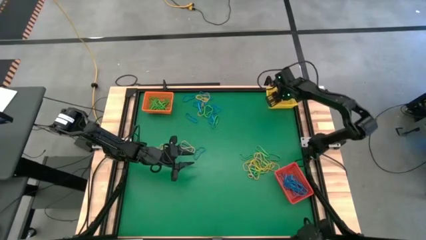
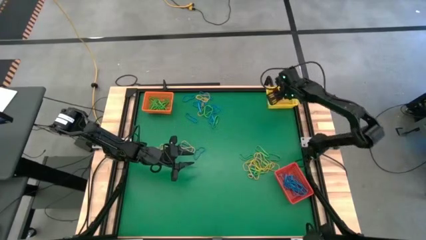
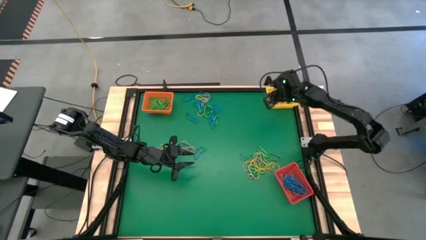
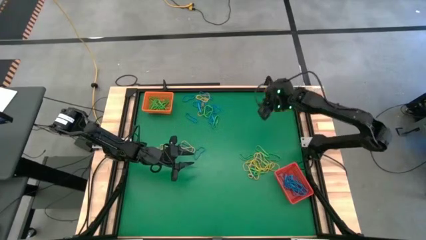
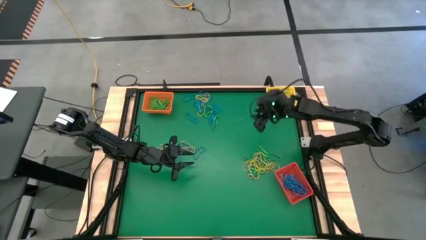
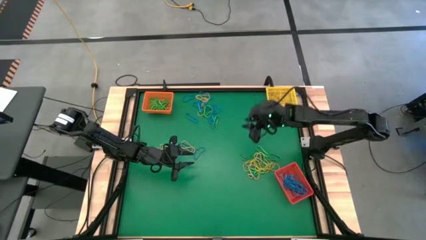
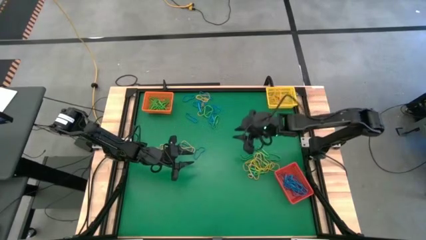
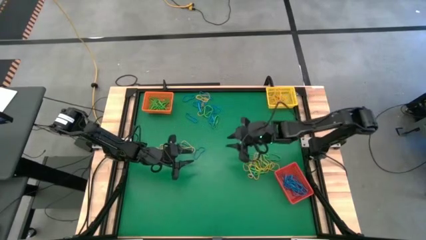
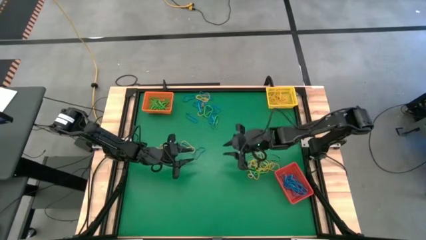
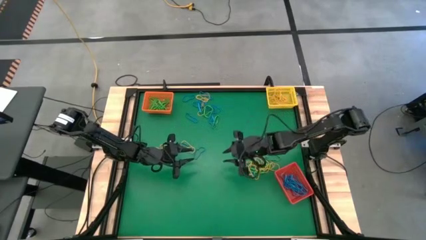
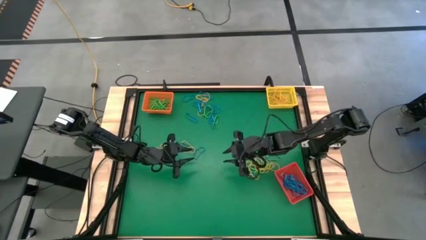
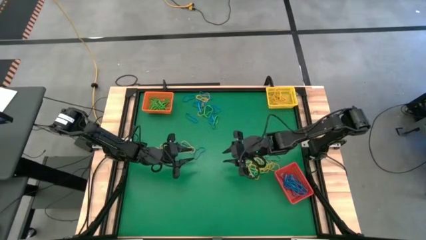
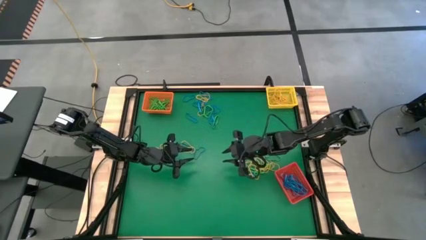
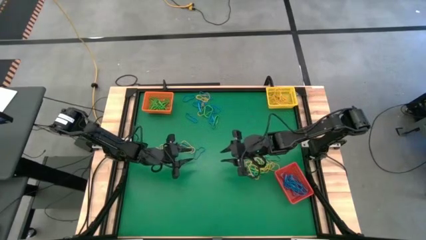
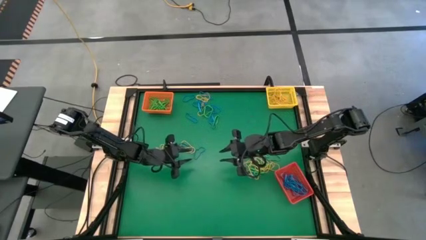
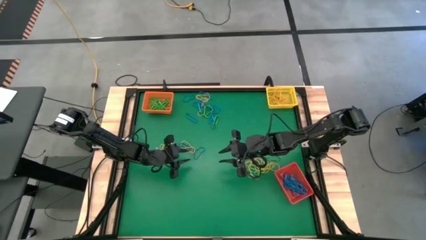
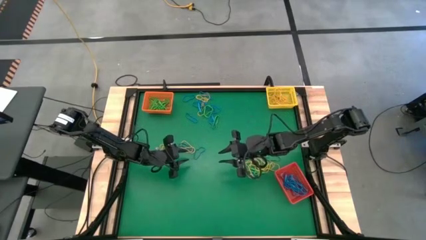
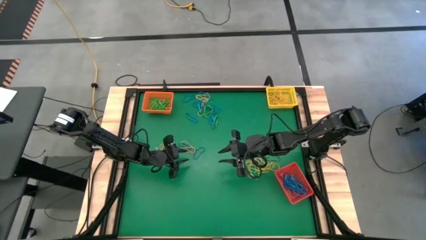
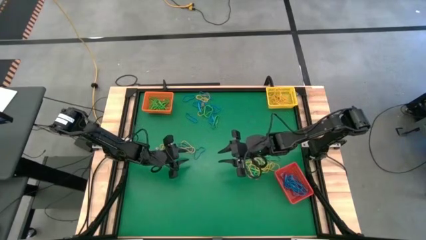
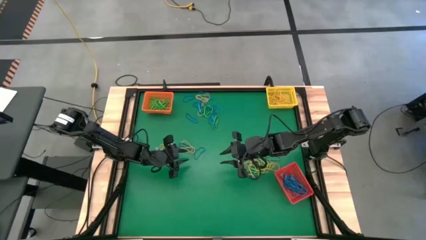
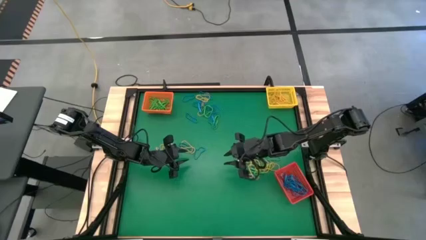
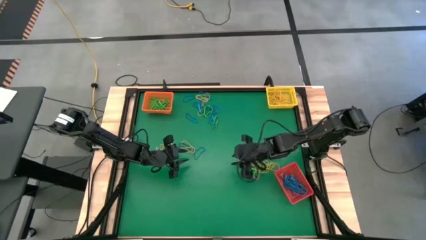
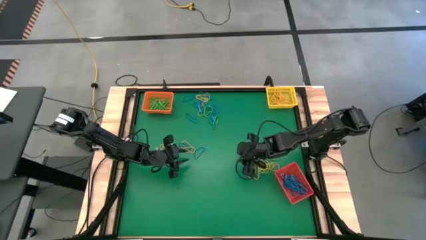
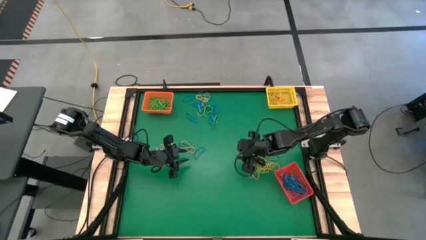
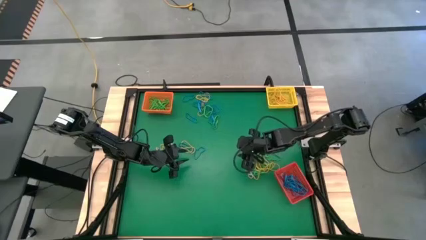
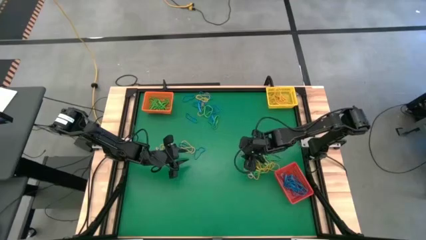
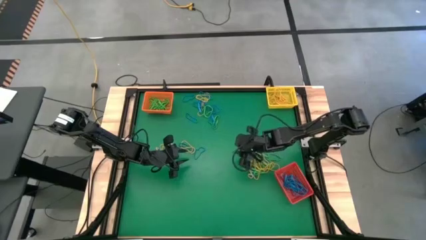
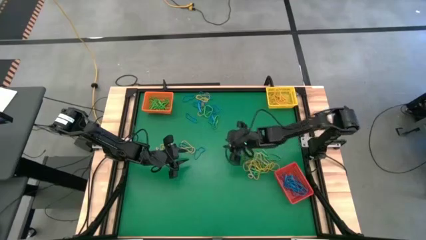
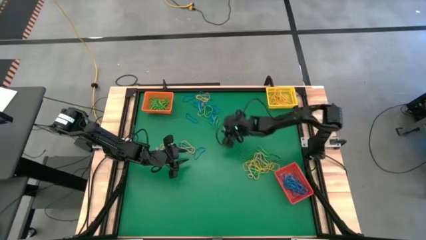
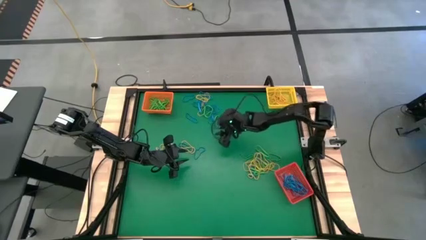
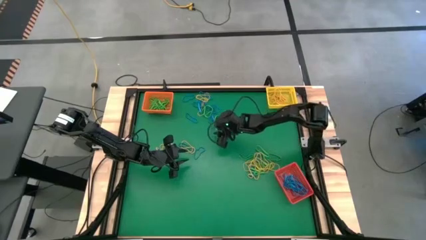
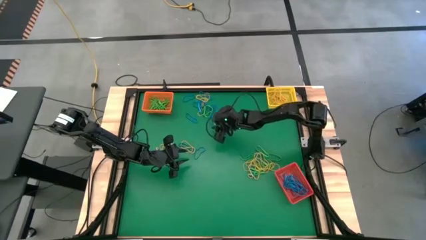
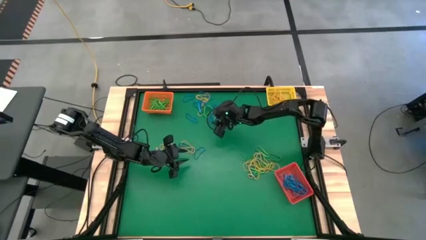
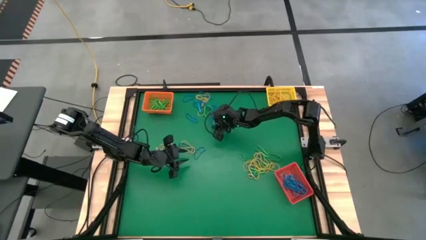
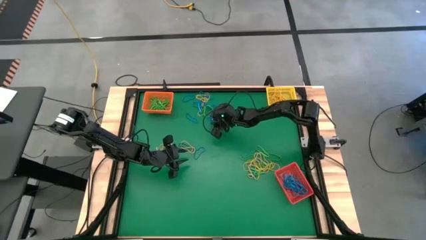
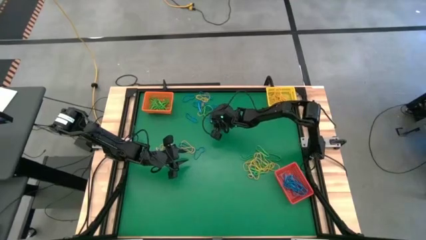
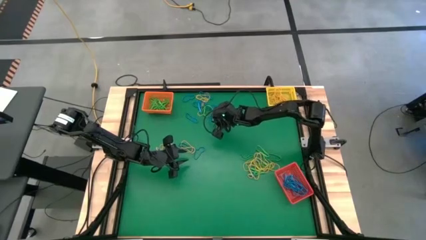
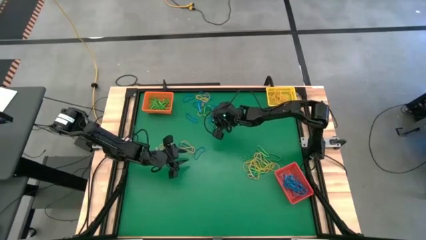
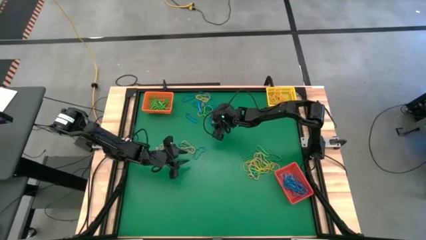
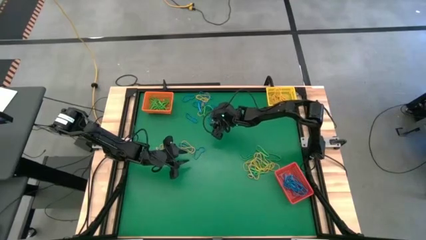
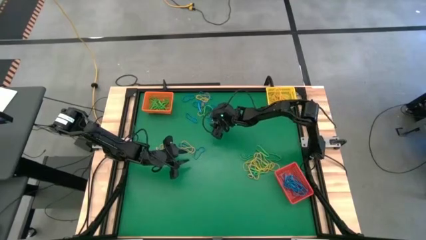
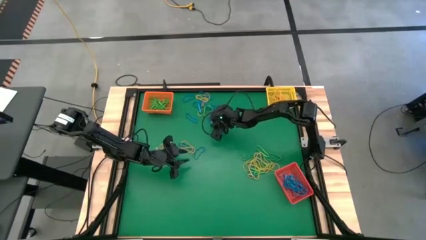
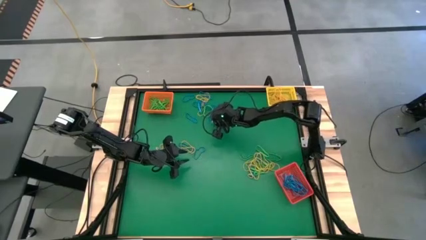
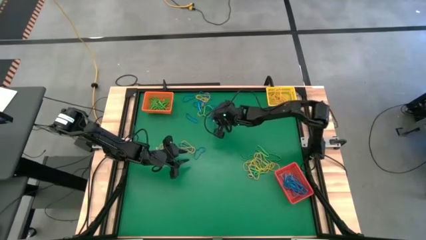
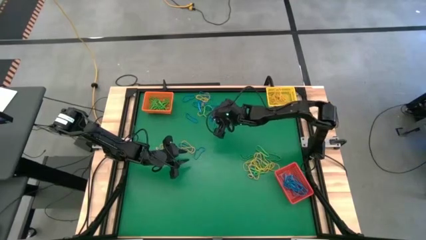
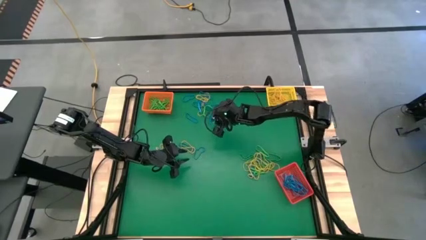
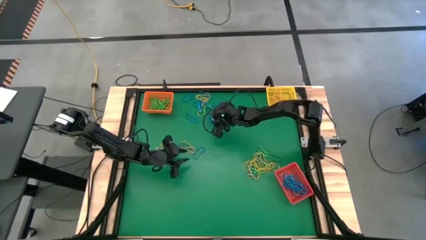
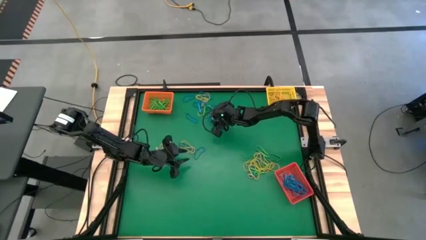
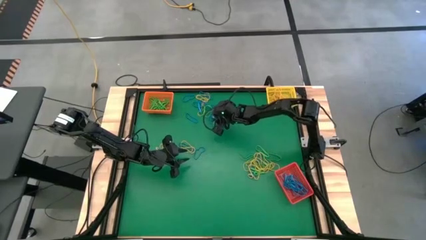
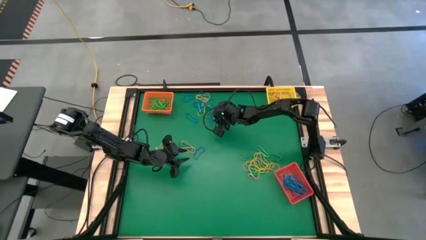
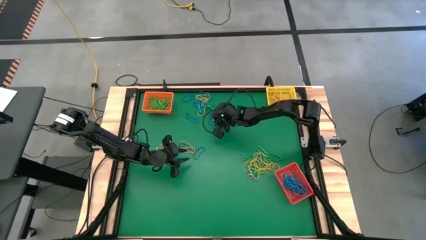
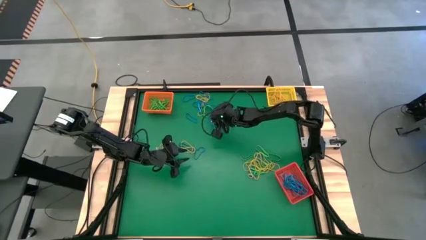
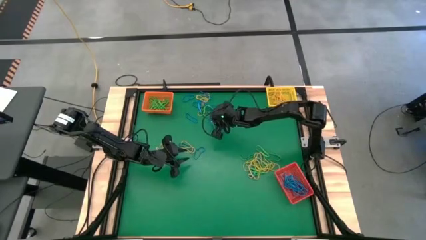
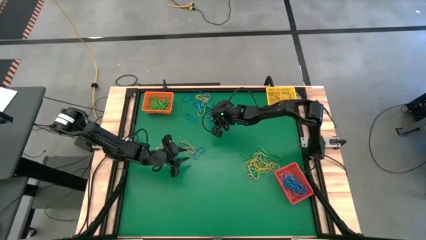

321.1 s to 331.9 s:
Task: Sort rubber bands into baskets
Put the blue rubber band into the red bin

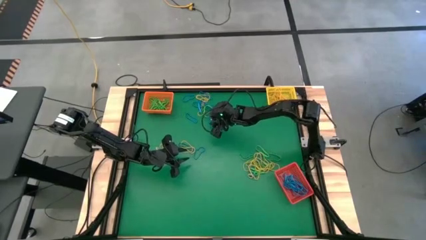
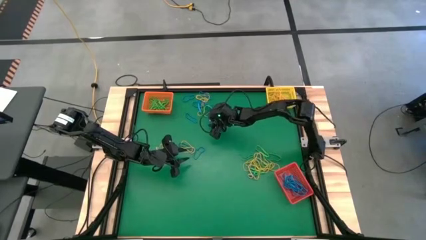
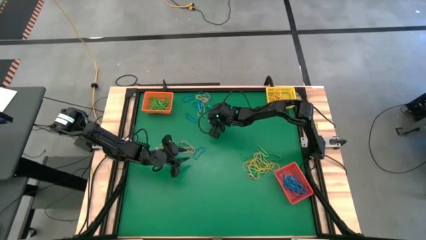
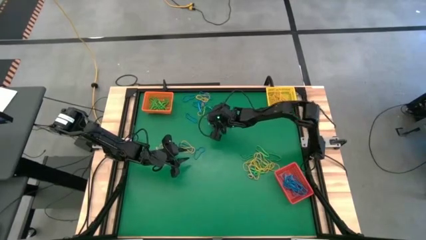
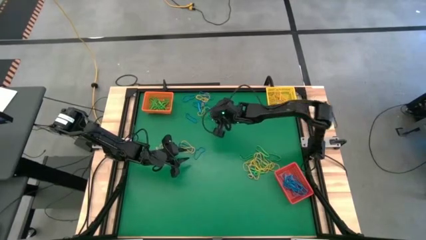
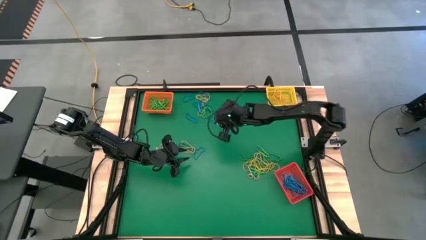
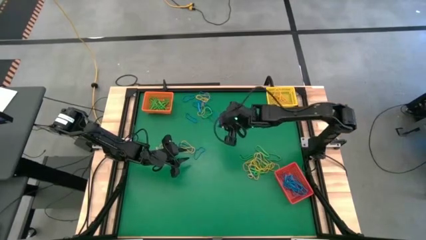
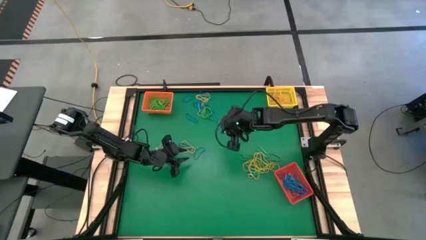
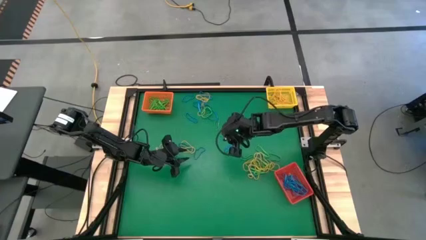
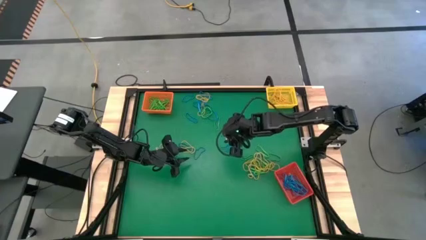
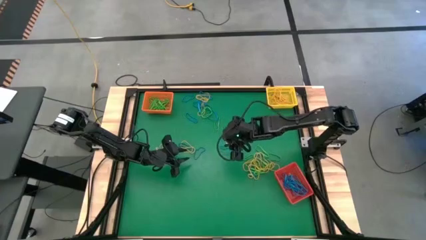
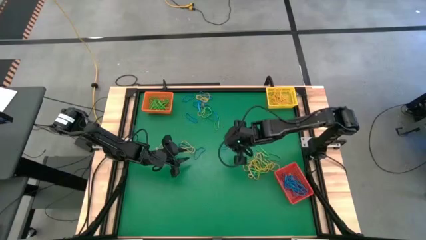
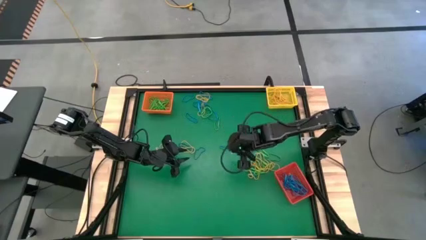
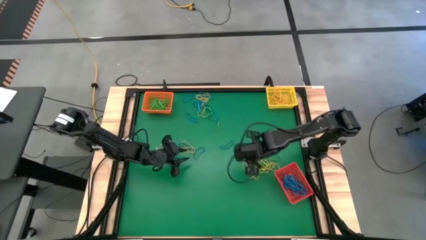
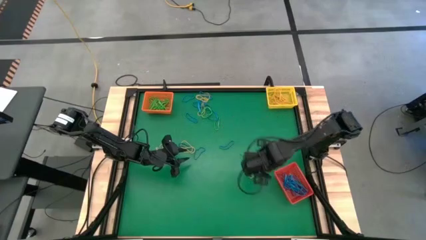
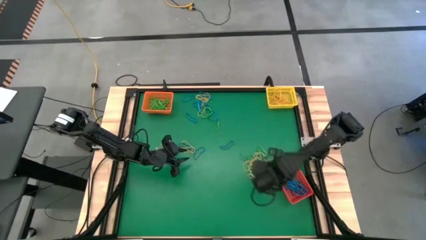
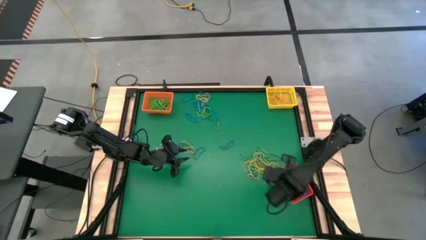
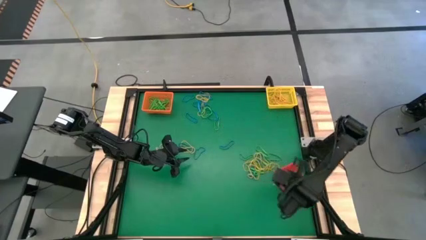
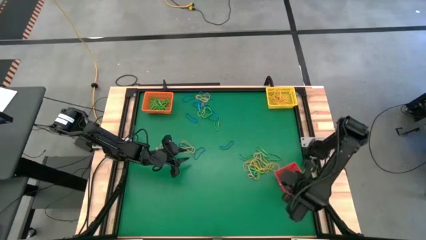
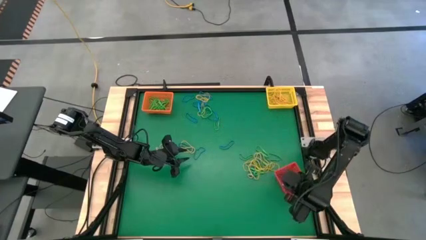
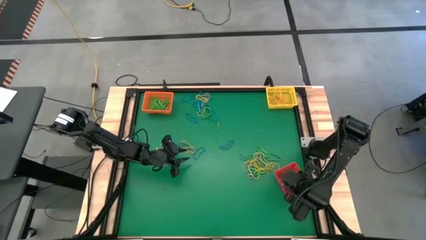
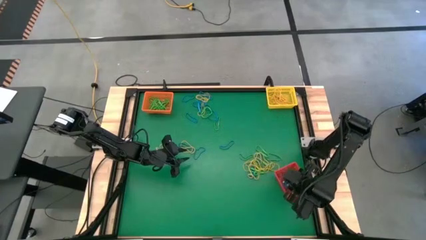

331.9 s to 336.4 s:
Put the blue rubber band into the red bin

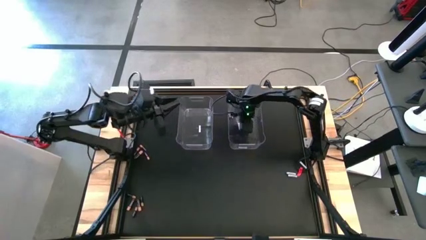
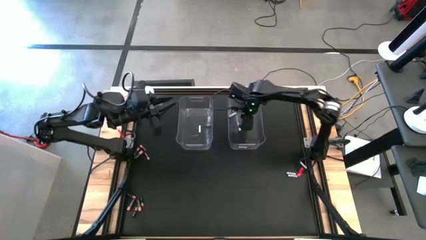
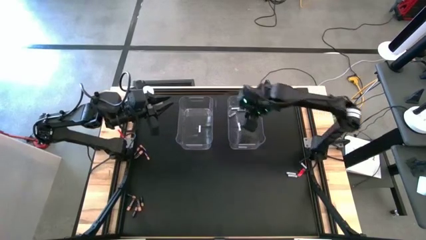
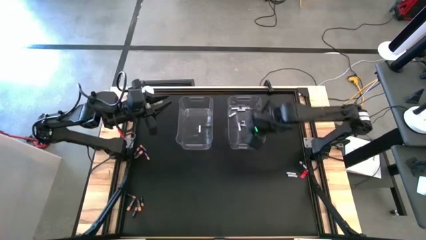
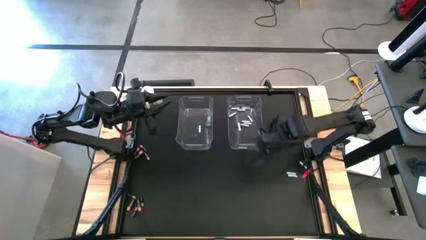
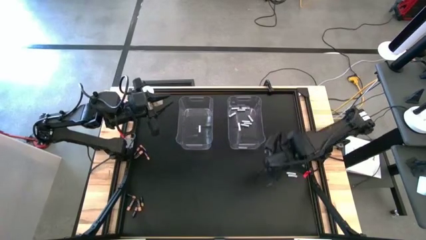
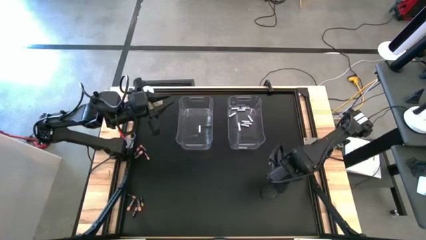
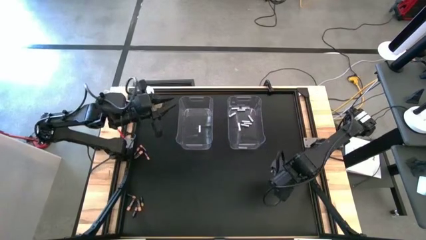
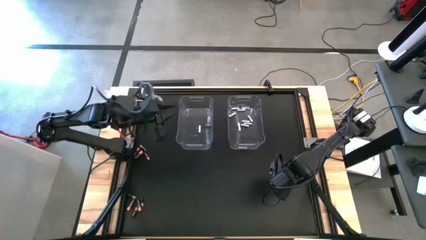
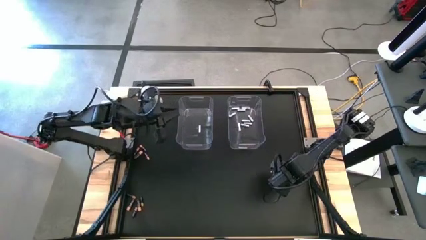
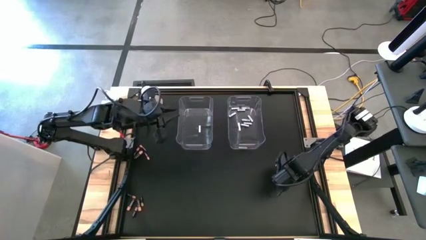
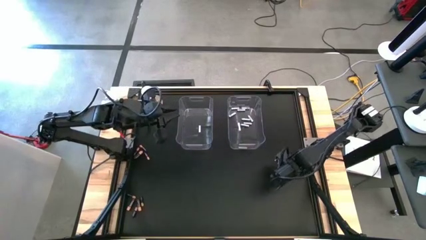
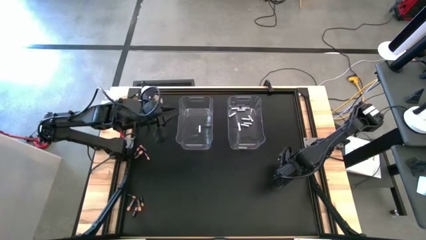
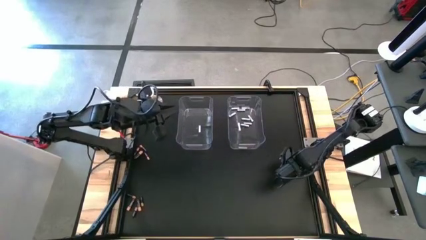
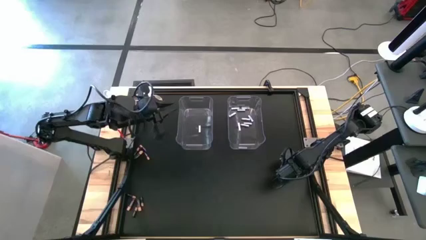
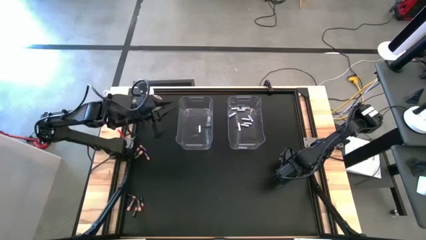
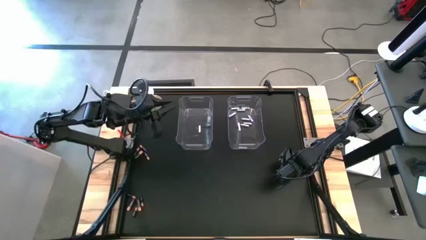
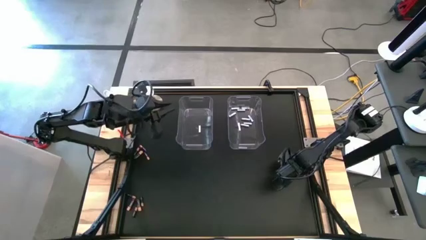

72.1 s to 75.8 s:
Task: Sort batteries
Put the white battery into the right transparent bin
